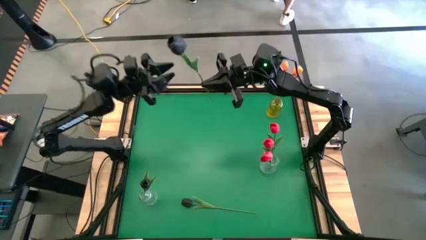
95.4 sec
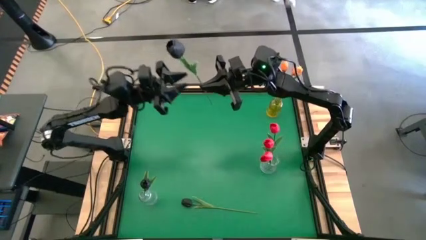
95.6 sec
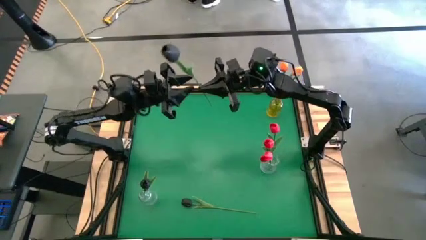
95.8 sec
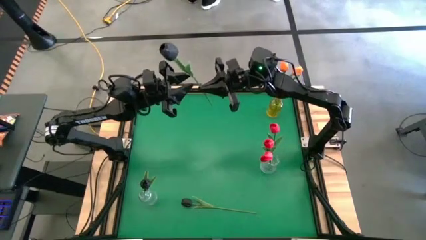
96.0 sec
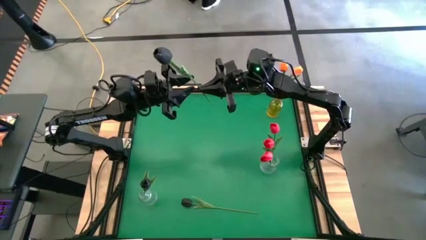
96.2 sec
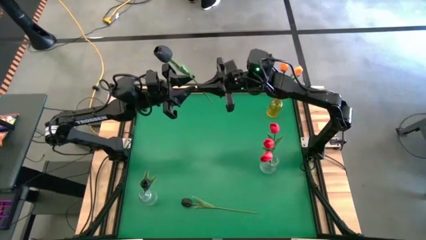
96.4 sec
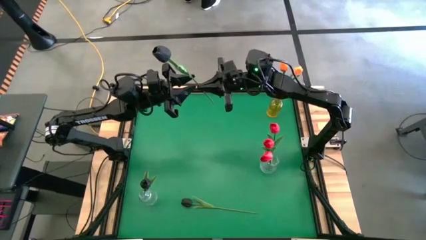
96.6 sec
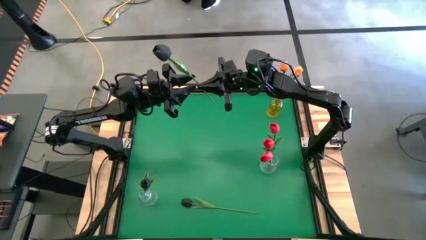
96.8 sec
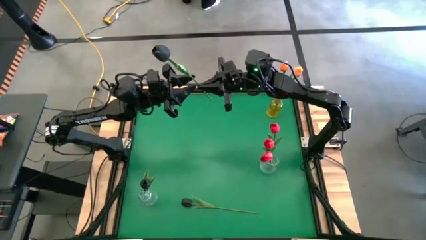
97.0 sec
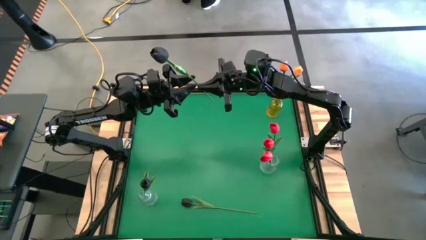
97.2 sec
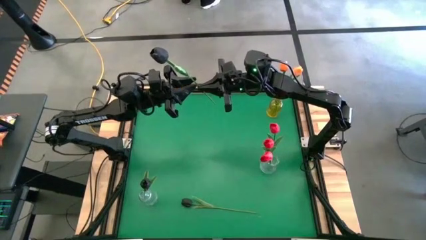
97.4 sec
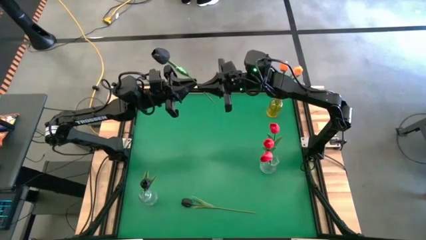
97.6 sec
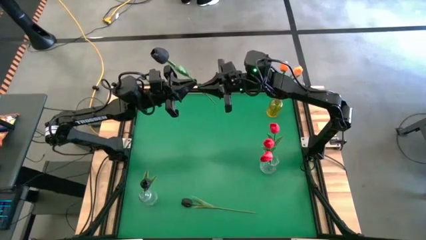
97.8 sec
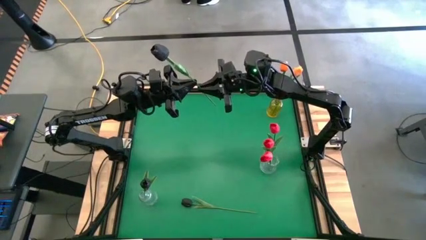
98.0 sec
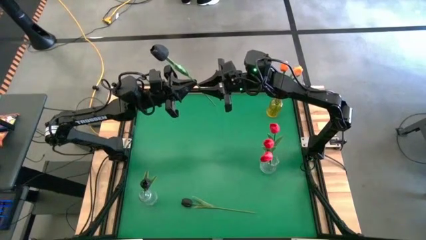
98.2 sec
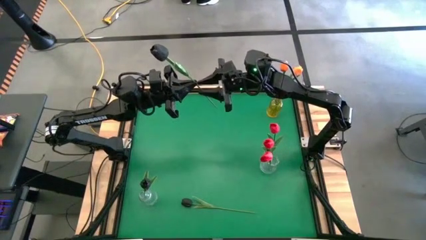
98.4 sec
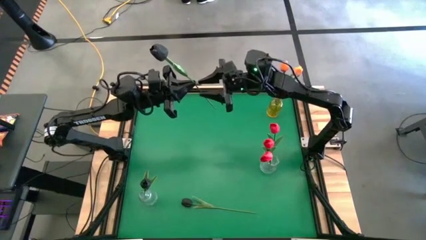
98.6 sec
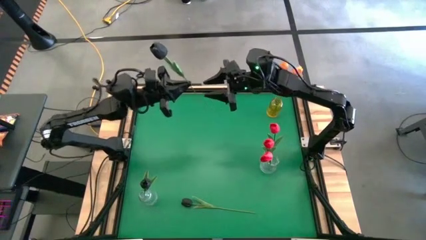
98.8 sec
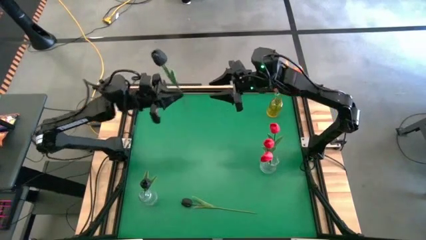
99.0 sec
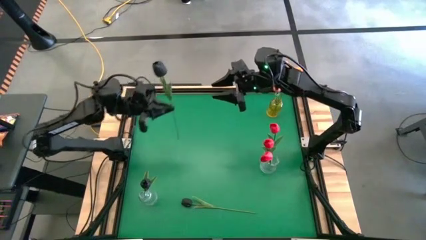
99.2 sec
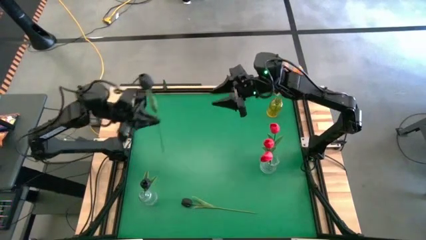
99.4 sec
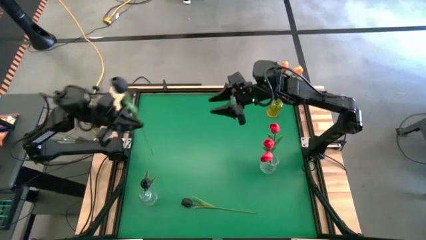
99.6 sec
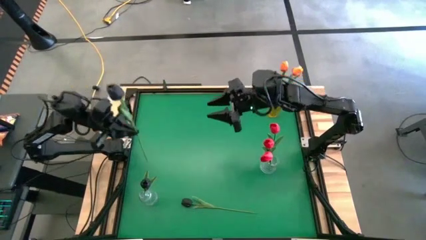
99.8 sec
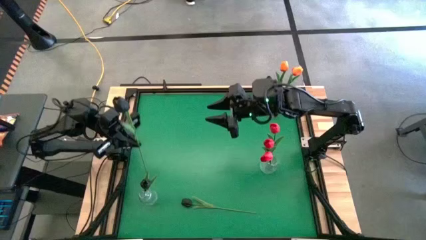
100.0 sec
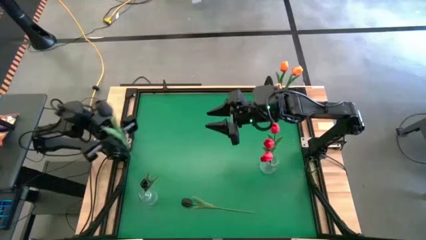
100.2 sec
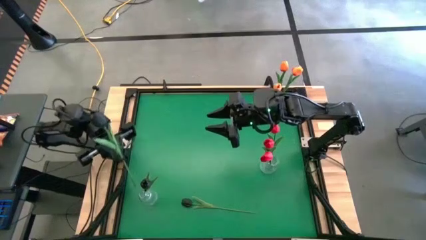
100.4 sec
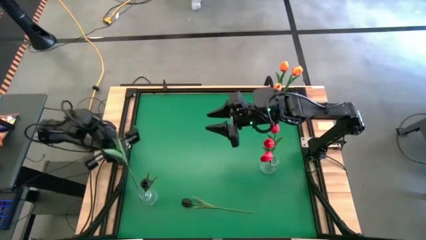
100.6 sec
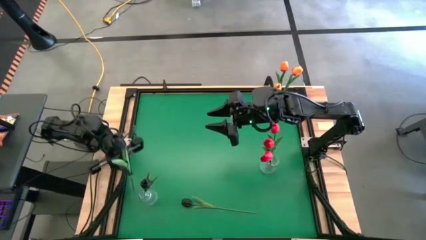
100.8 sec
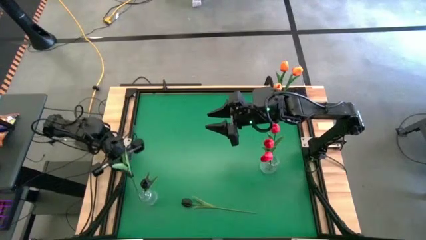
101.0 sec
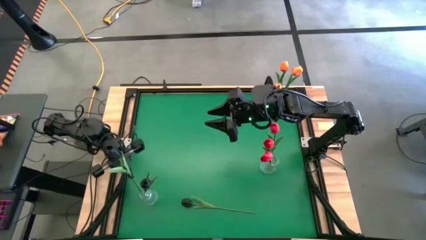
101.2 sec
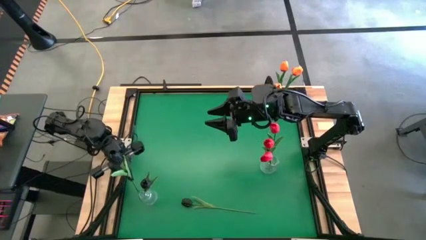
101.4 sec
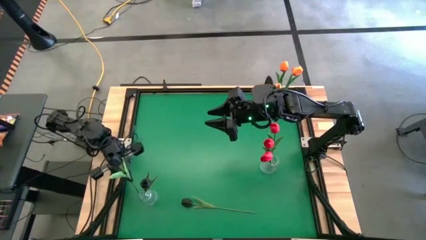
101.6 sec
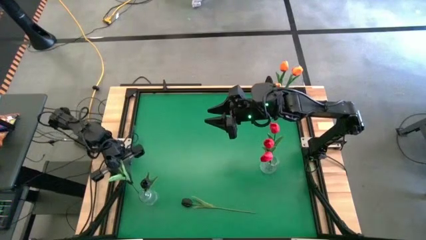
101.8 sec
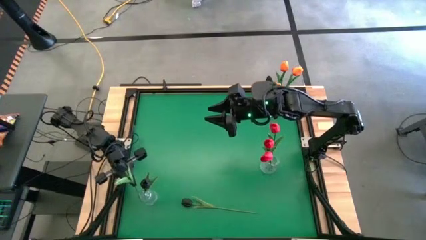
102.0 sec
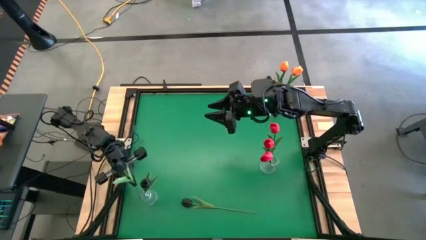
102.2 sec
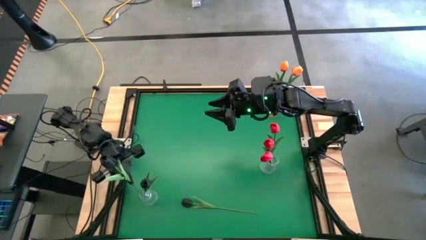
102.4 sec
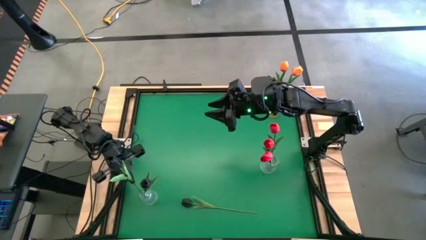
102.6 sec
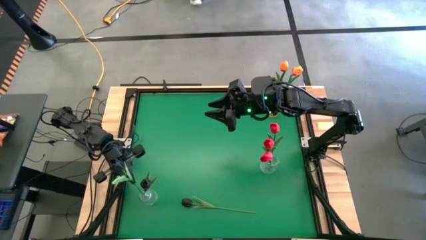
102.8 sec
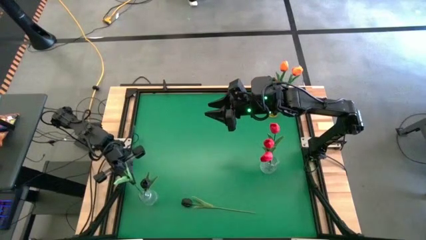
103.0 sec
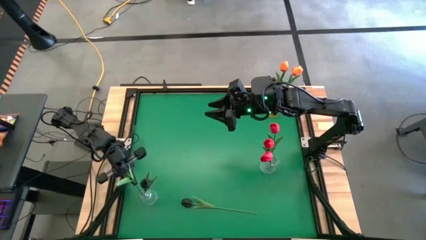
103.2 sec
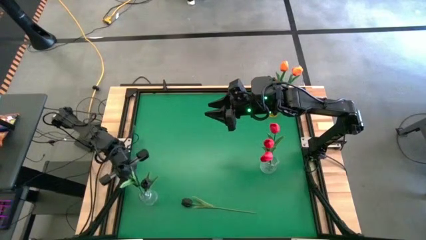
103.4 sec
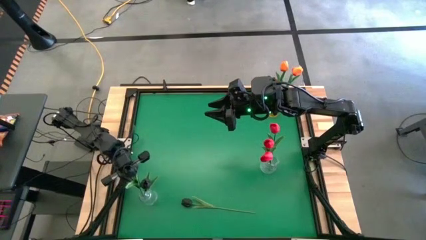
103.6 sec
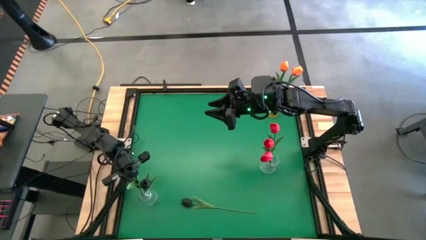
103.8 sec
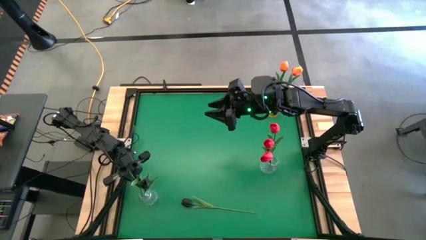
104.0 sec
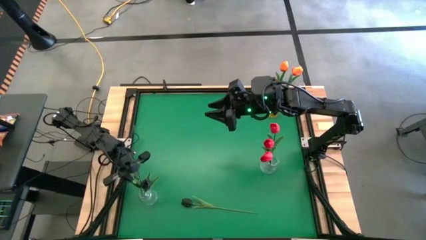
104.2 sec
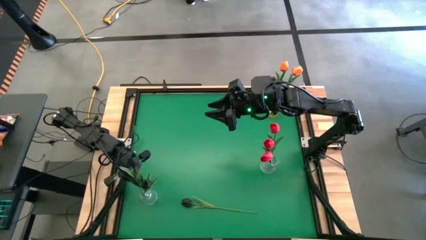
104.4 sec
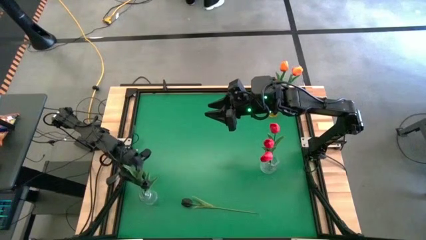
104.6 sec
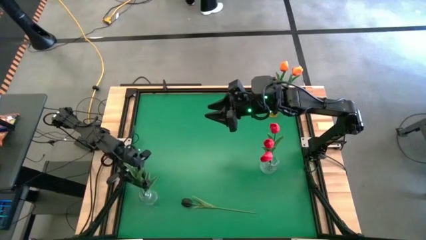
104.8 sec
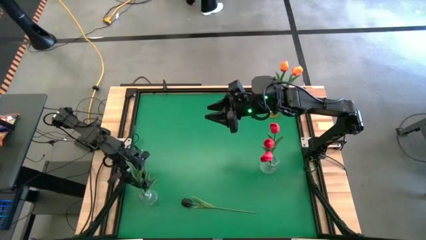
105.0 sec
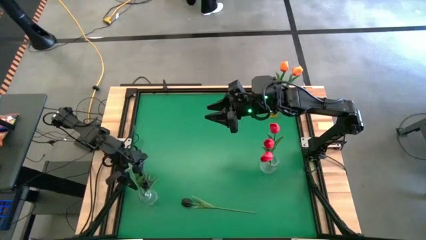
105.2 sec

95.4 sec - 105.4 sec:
Task: Sort flowers into vase by color
Put the top black tulip into the bottom transparent flower vase
